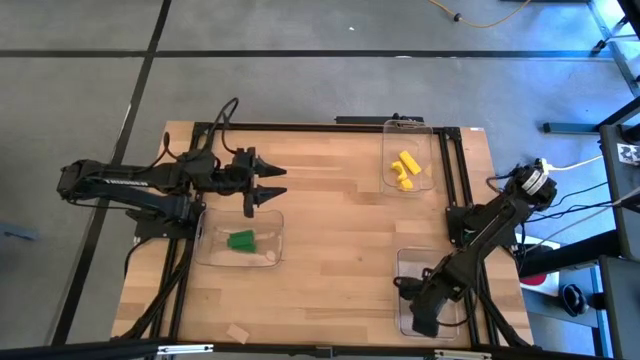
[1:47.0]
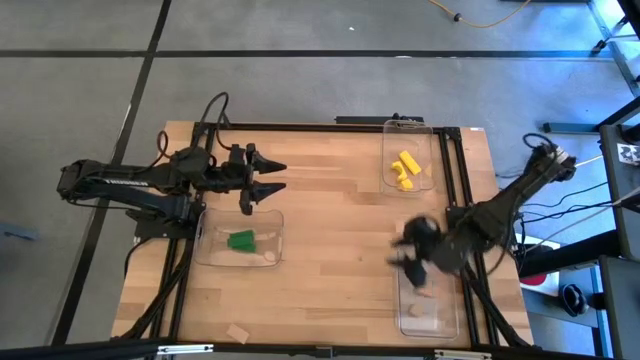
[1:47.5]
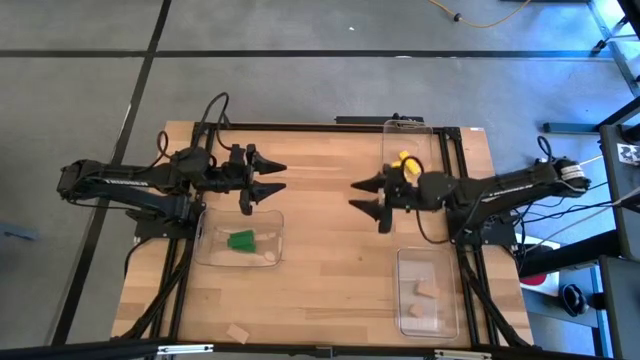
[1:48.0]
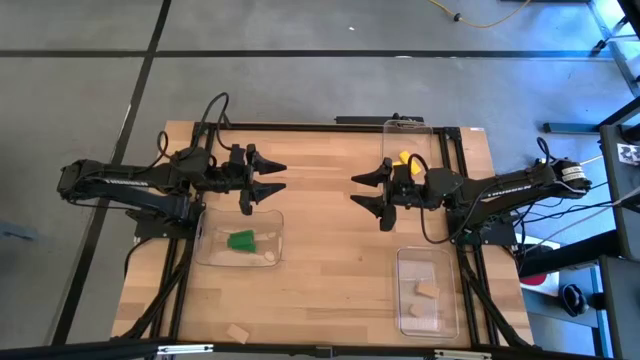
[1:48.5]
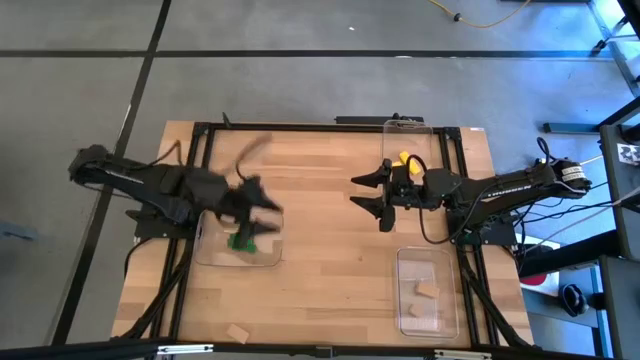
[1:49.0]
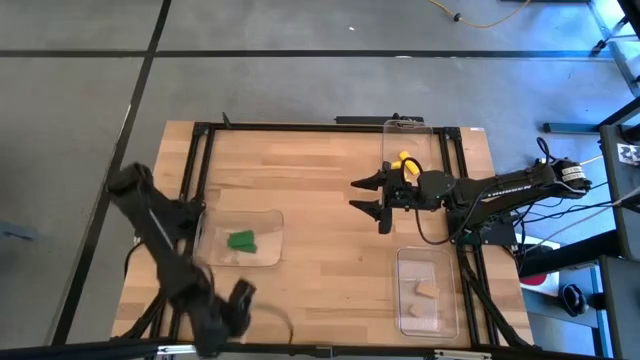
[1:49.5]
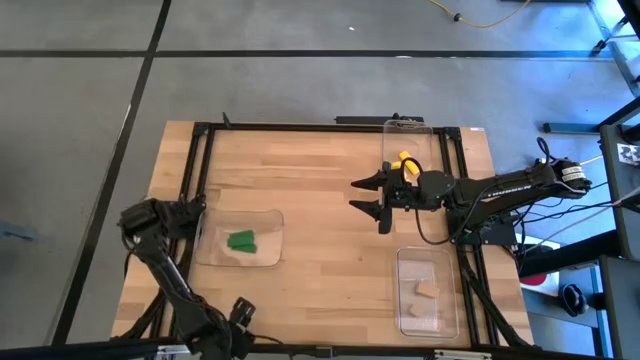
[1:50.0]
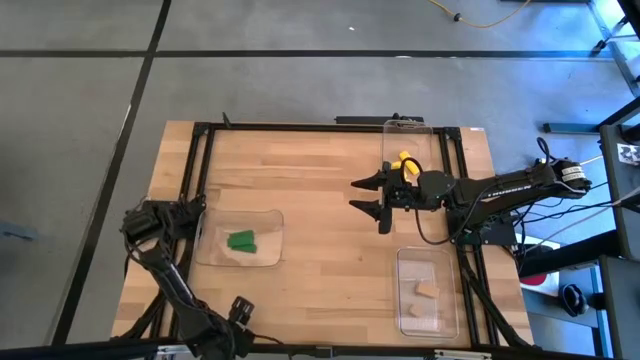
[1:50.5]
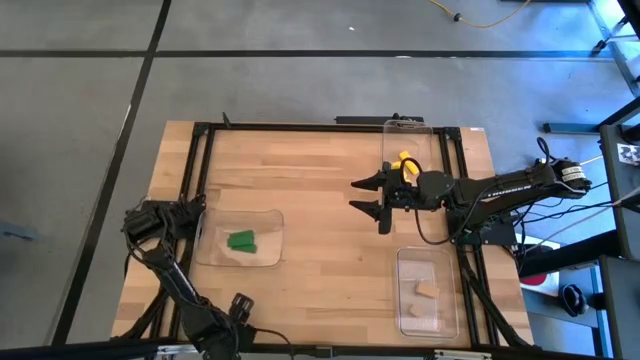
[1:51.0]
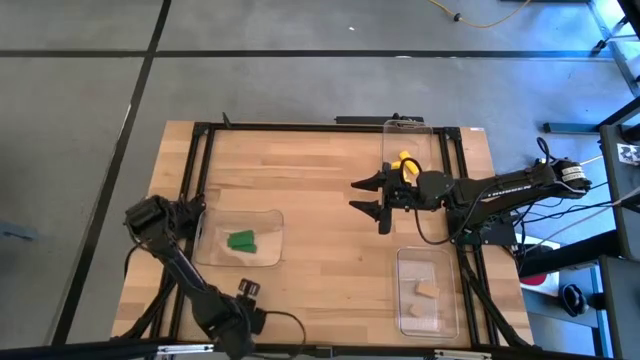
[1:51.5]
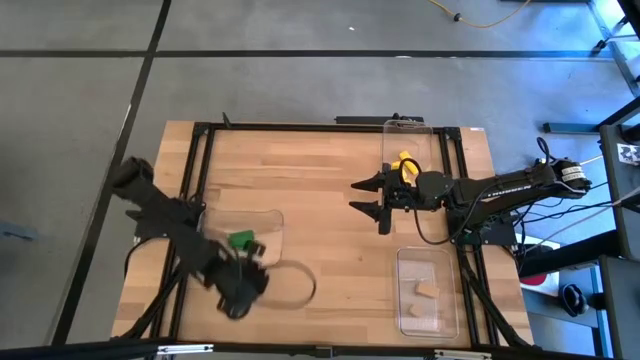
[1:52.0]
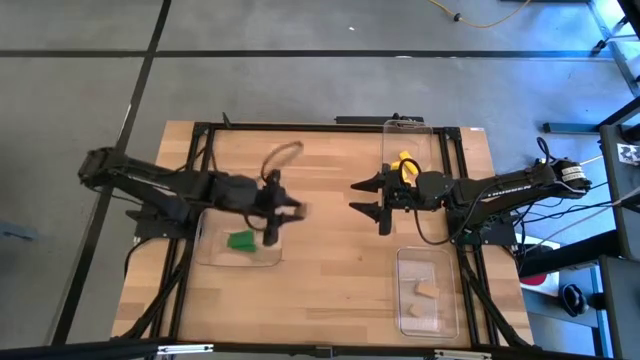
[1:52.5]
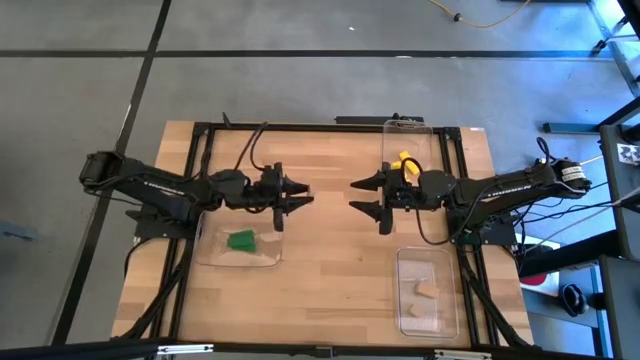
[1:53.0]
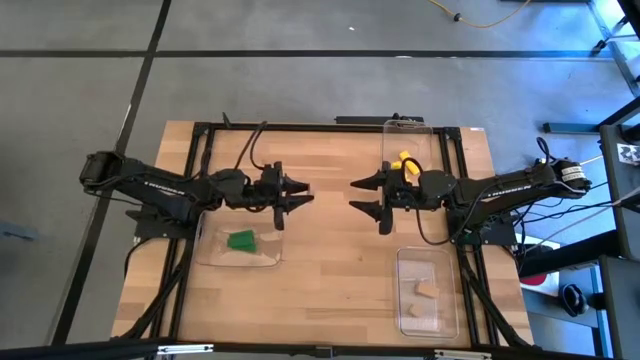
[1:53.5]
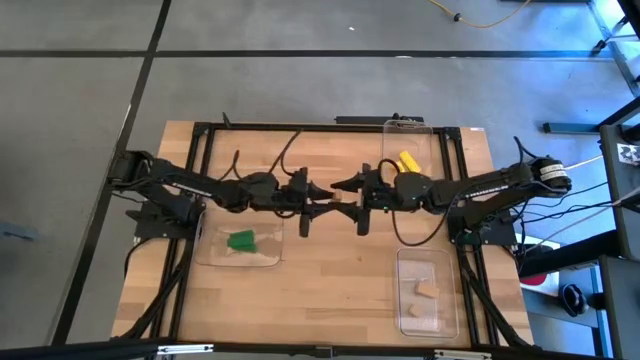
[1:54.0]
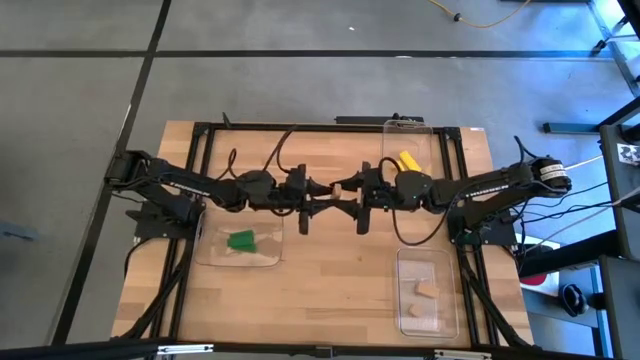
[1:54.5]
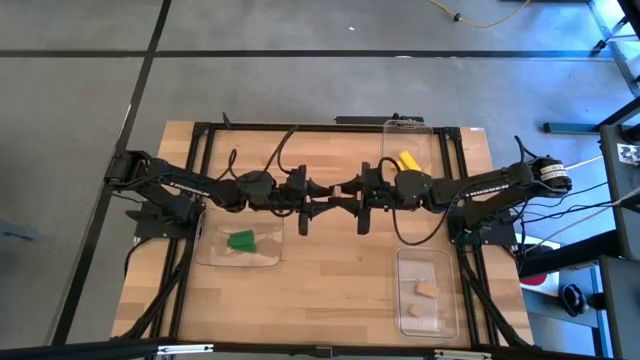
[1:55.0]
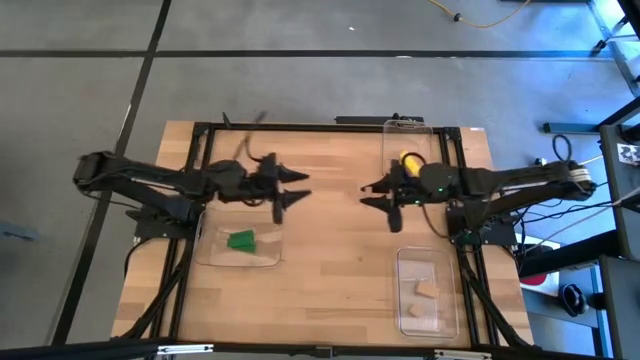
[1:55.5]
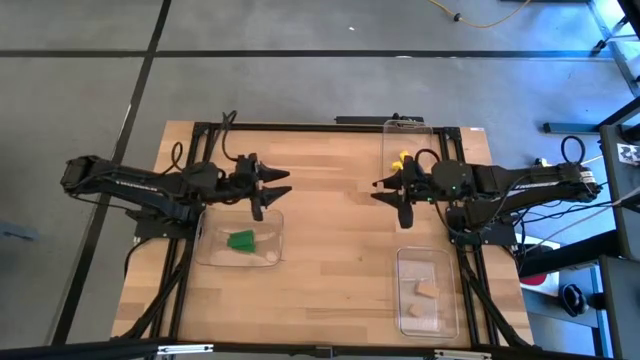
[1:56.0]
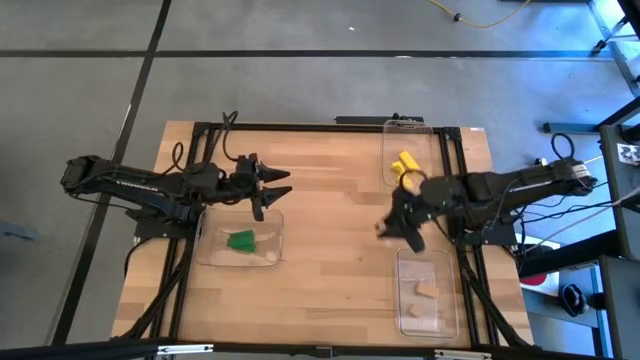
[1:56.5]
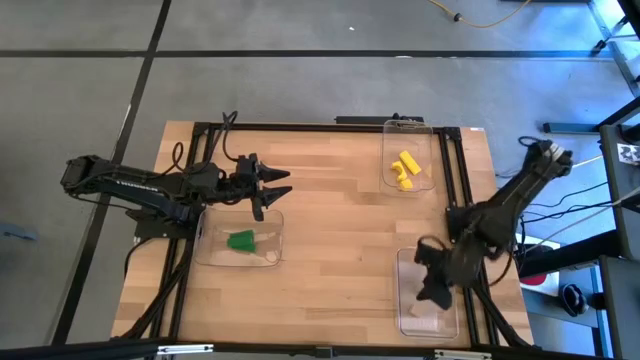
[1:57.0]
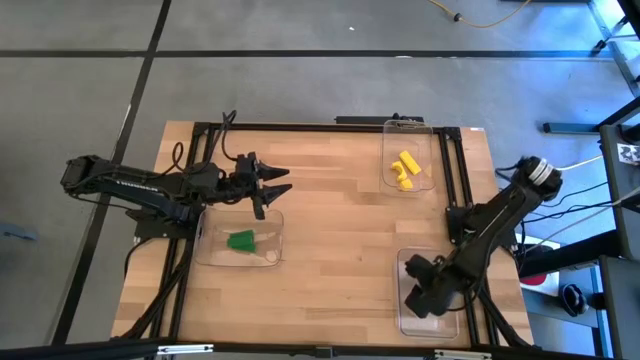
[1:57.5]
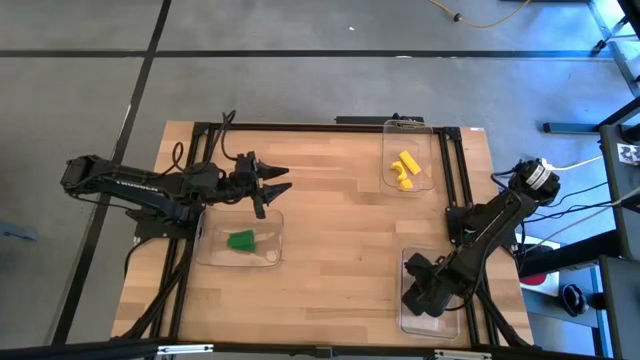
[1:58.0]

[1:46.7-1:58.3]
Task: Sort & place blocks by color
Put the brown block into the bottom right transparent bin

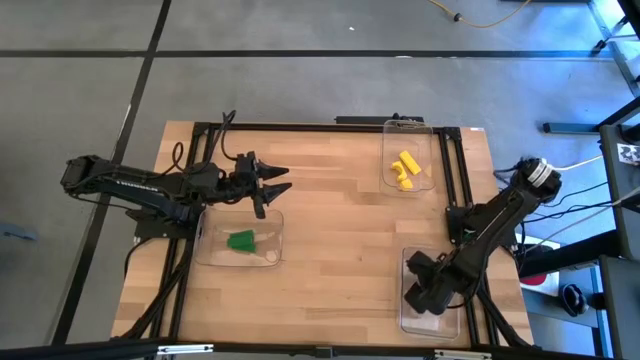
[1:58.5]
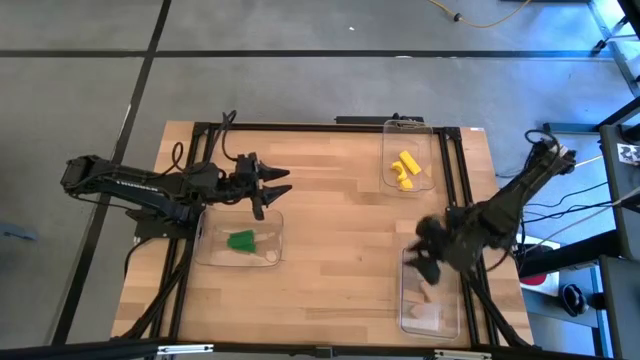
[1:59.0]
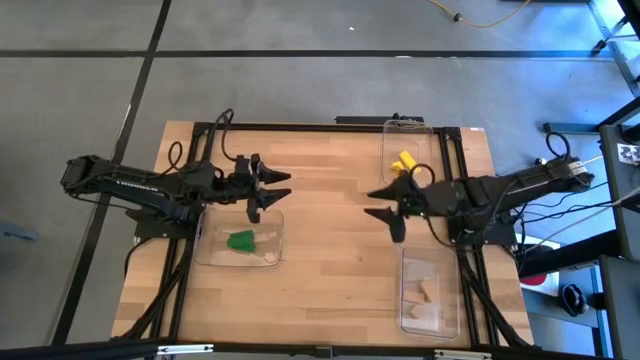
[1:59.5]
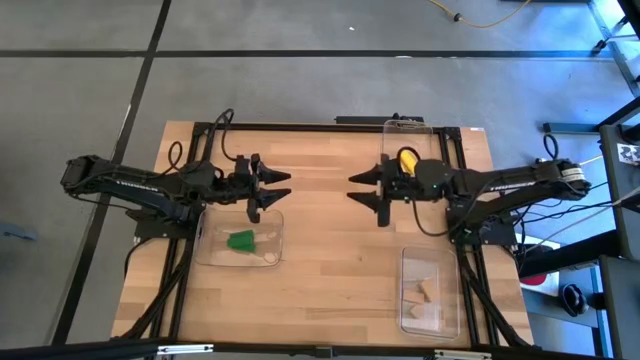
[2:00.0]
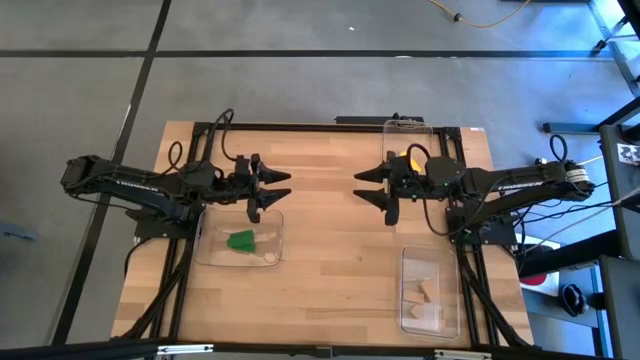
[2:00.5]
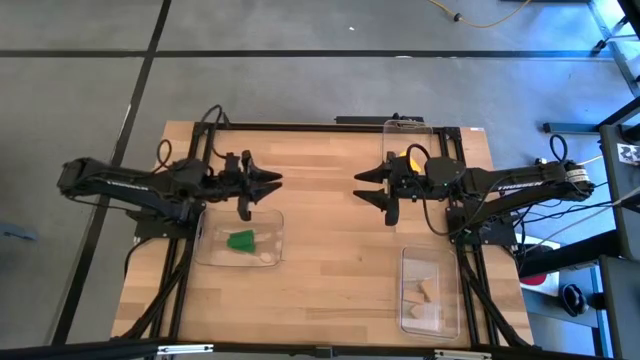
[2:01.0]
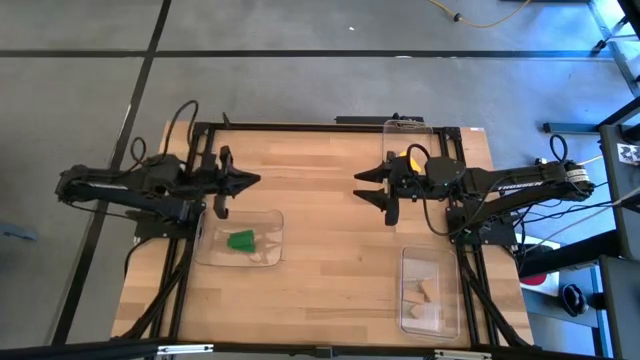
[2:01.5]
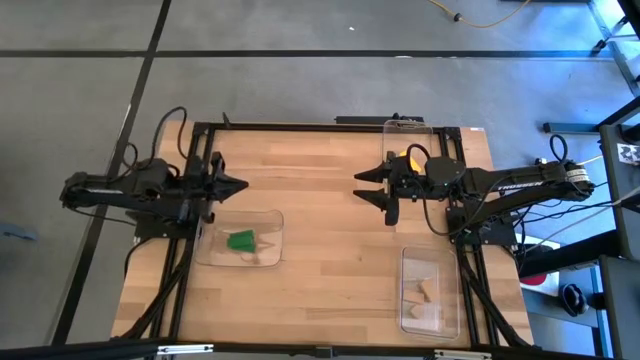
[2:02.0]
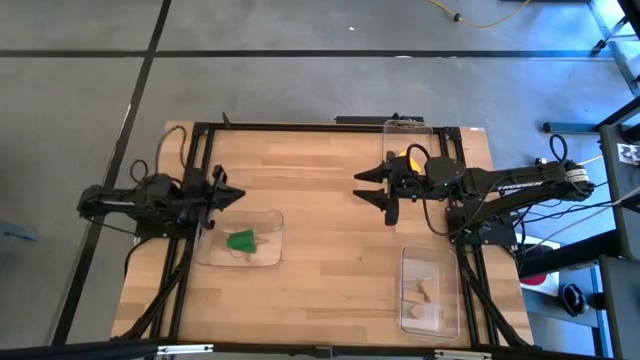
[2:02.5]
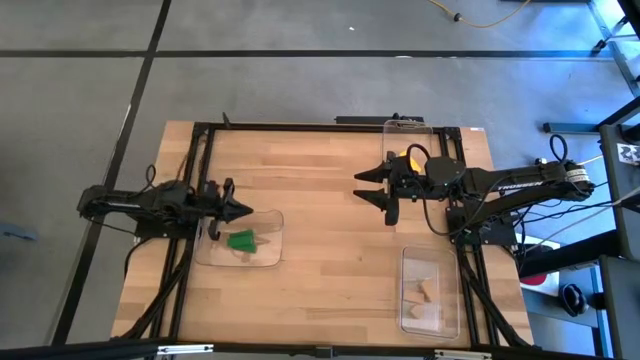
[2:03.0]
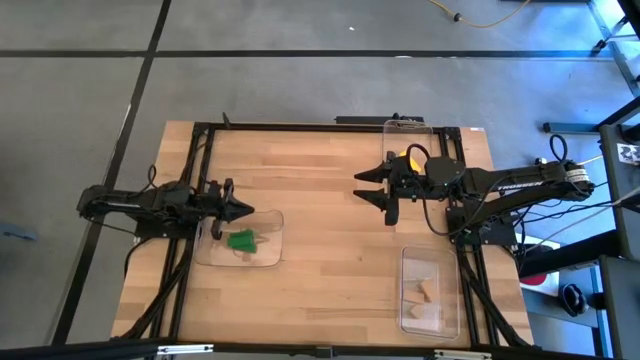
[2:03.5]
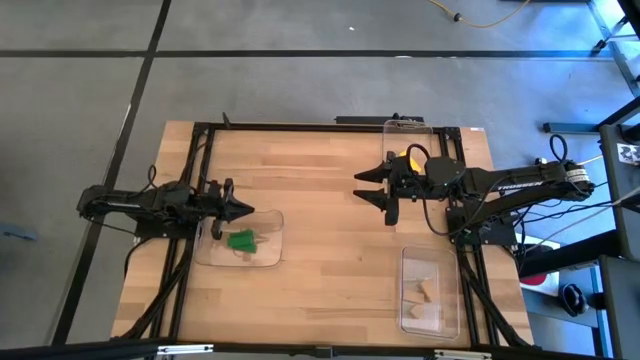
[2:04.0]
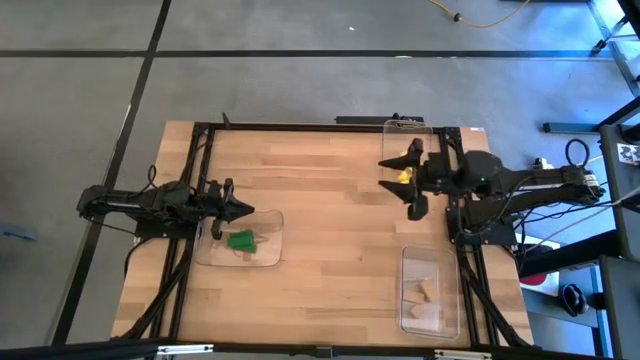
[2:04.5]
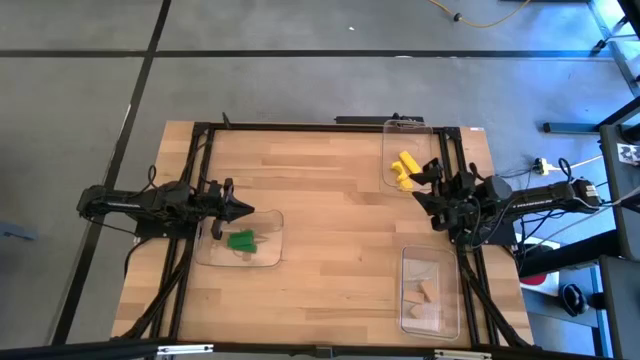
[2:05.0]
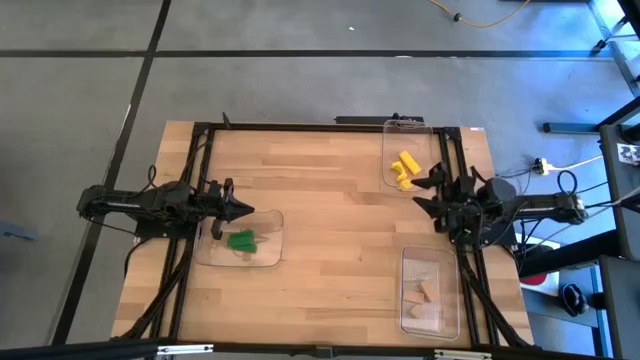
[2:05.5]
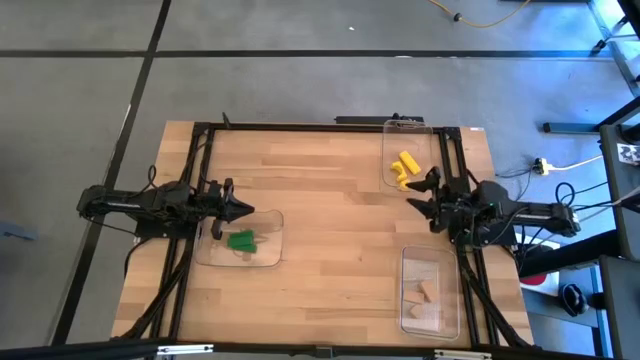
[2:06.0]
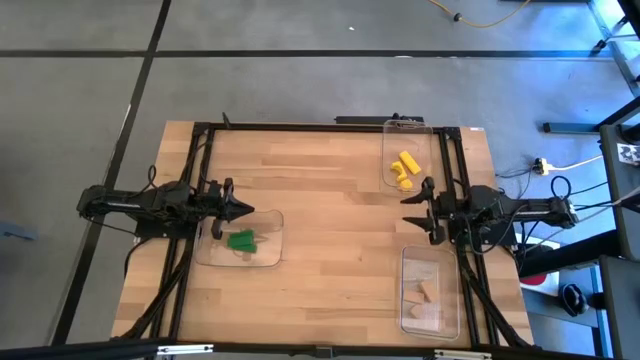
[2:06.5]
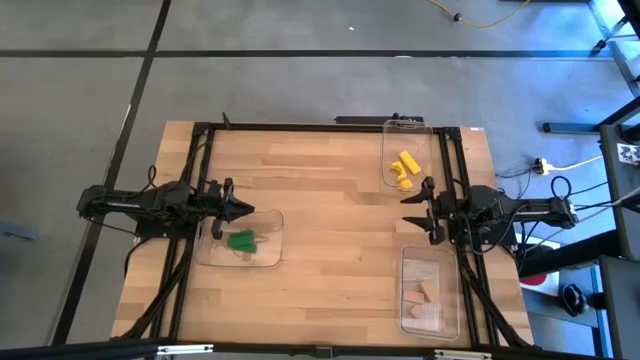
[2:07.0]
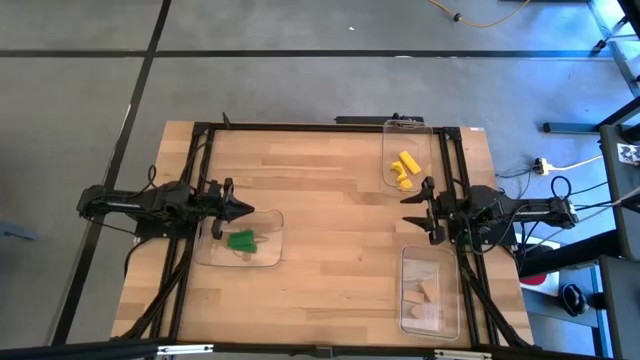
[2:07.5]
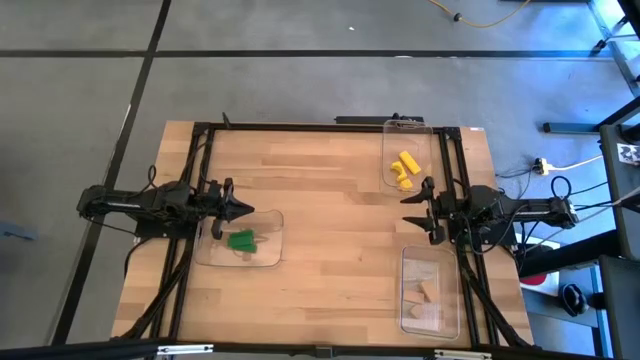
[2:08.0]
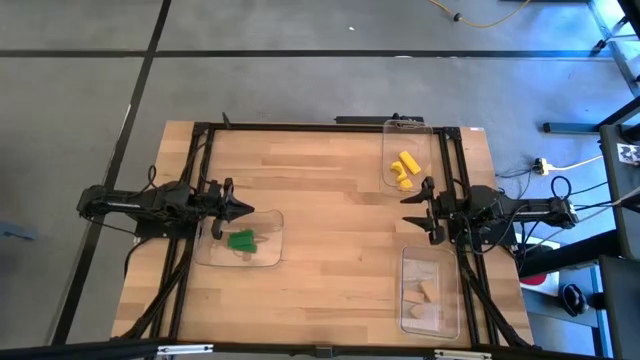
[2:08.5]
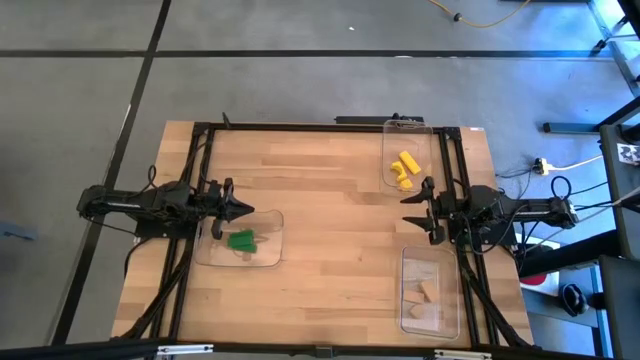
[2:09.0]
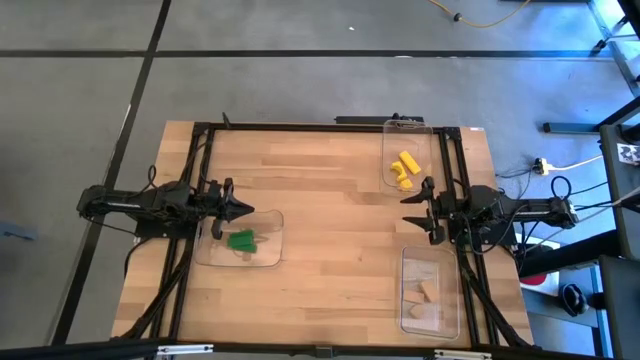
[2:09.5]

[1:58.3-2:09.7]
Return to Home Position
